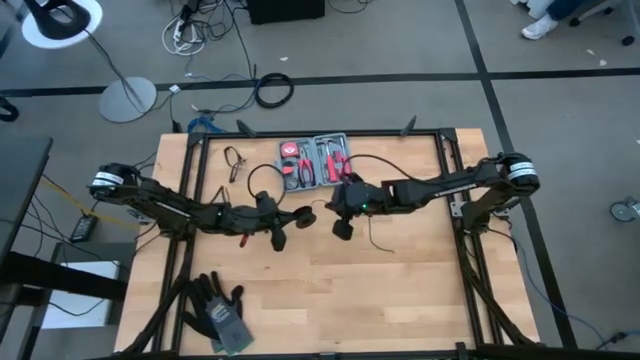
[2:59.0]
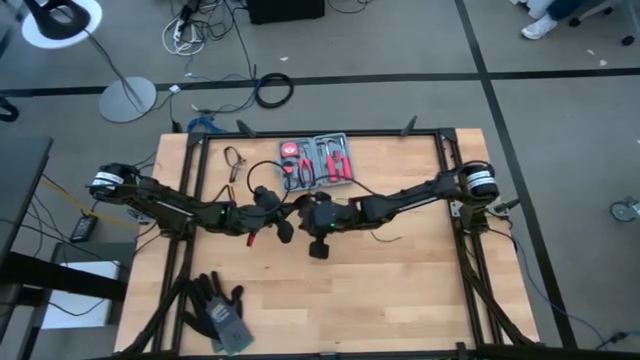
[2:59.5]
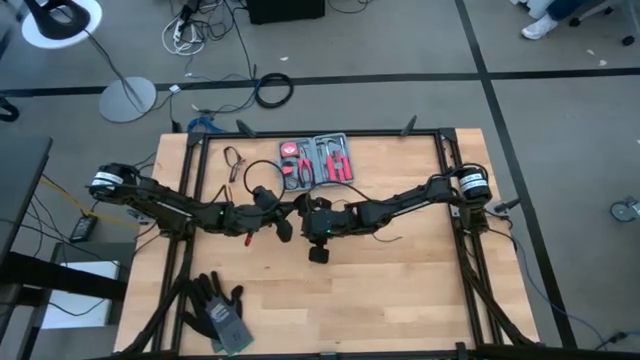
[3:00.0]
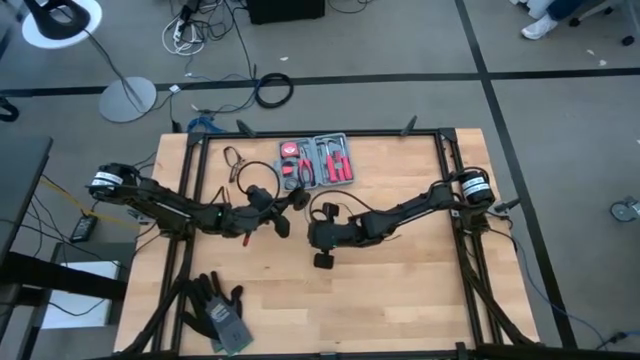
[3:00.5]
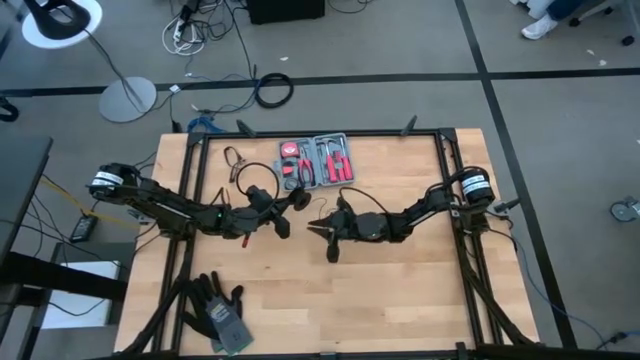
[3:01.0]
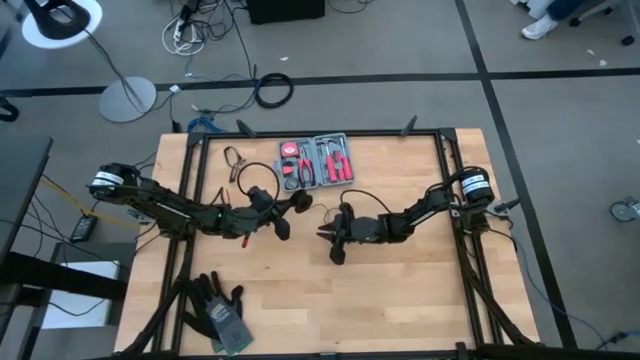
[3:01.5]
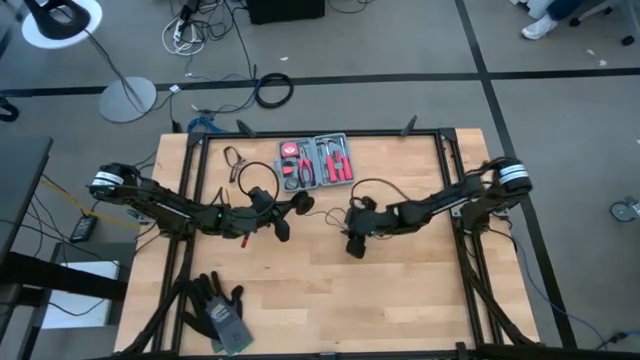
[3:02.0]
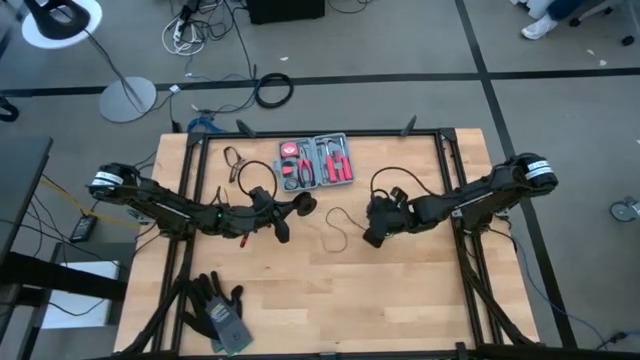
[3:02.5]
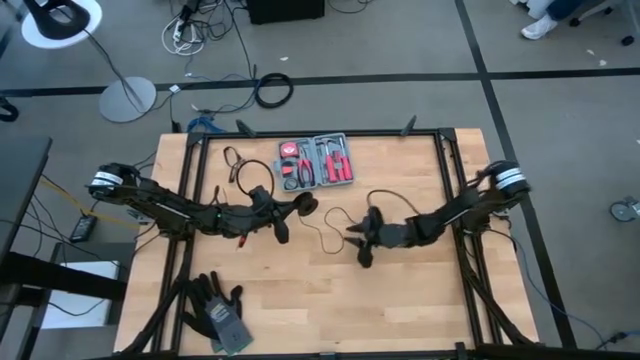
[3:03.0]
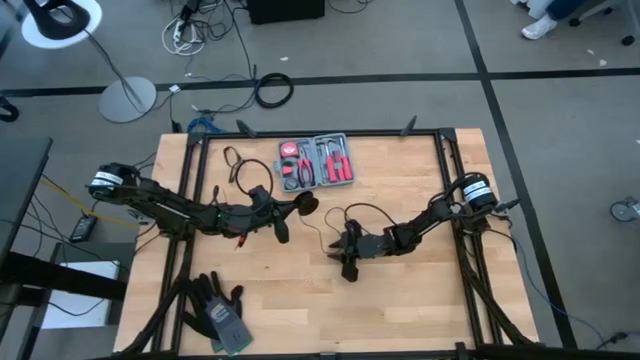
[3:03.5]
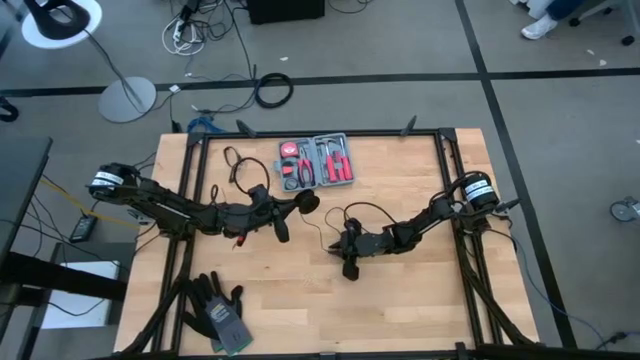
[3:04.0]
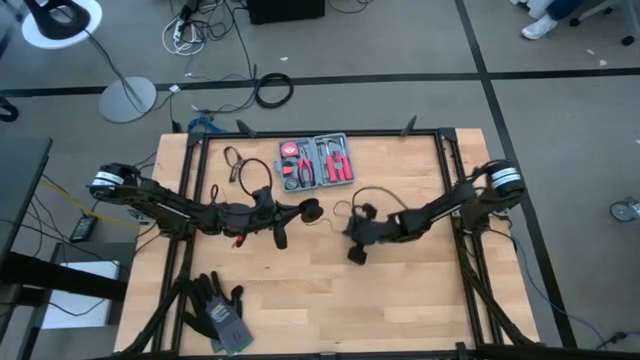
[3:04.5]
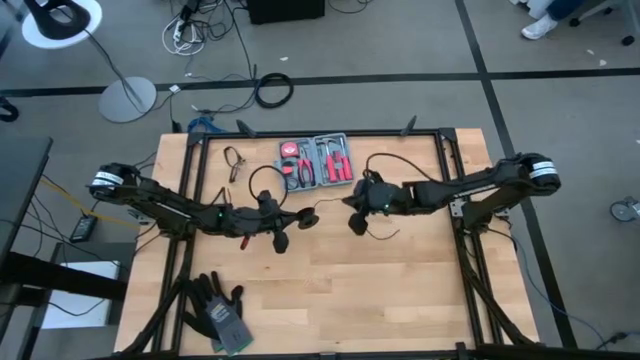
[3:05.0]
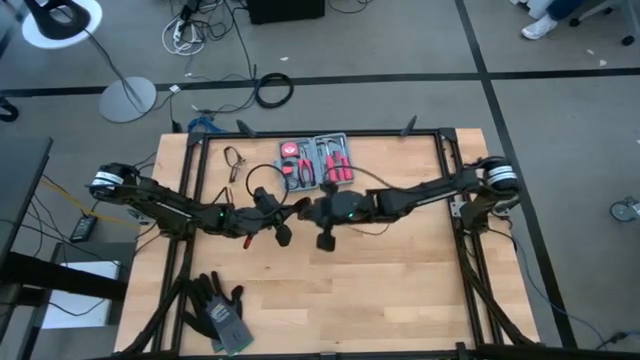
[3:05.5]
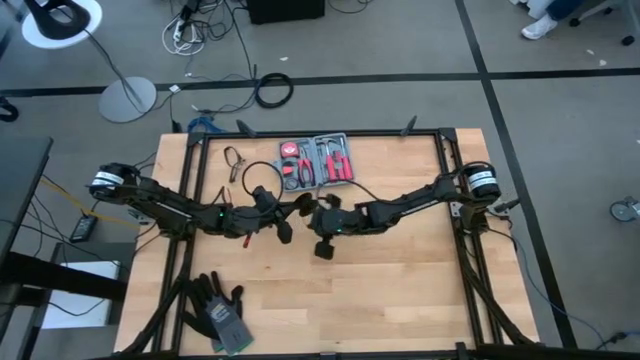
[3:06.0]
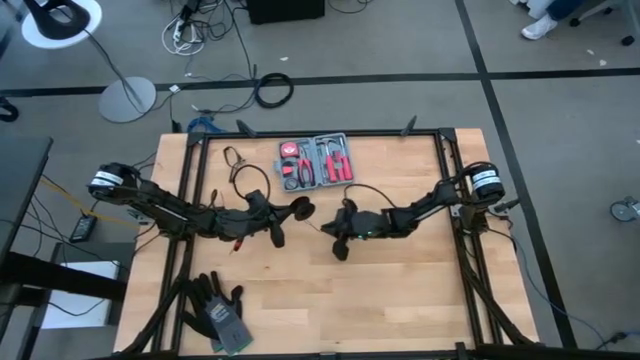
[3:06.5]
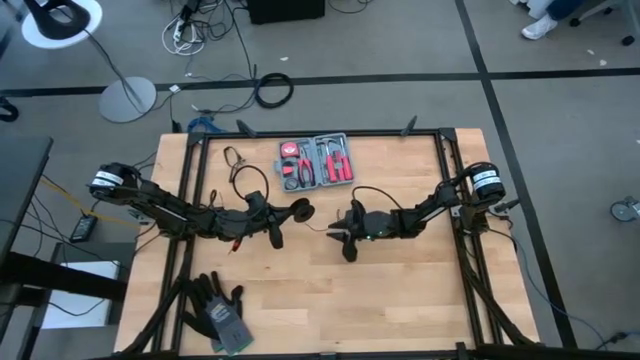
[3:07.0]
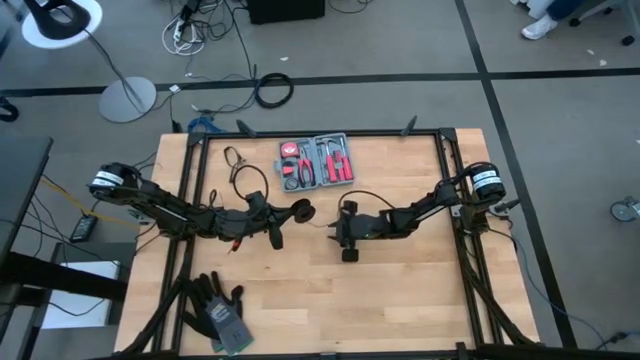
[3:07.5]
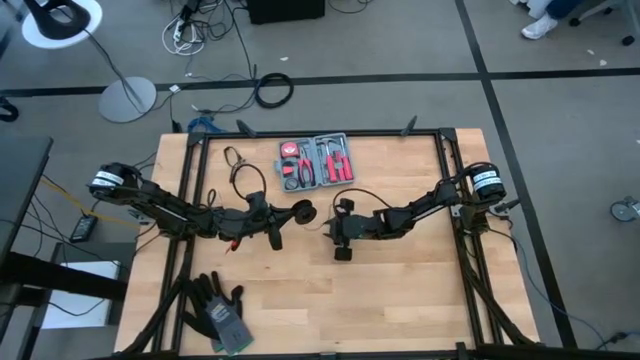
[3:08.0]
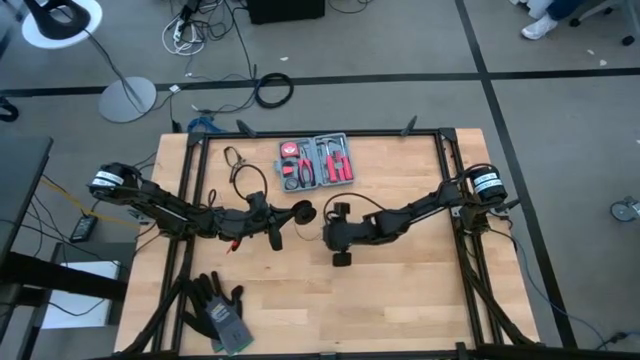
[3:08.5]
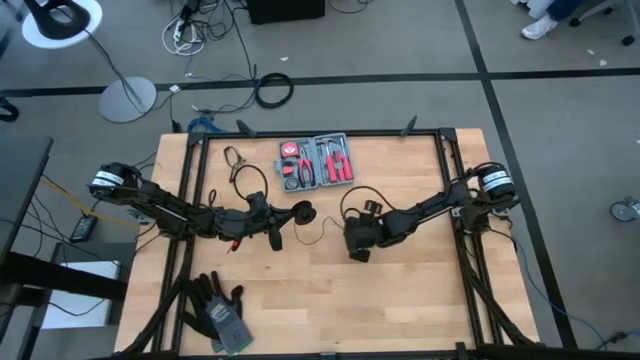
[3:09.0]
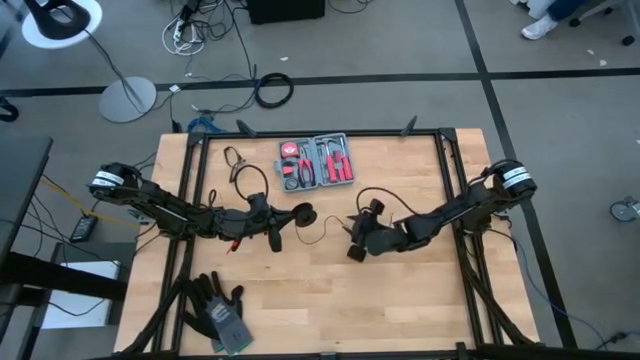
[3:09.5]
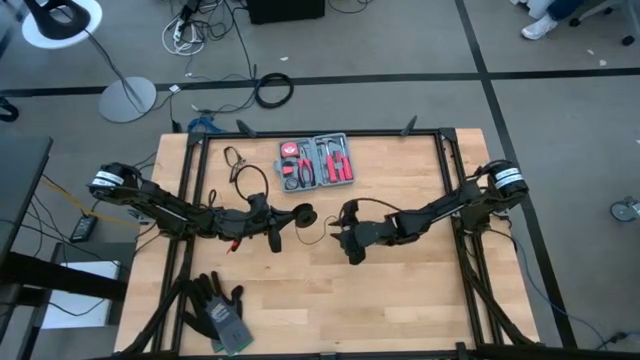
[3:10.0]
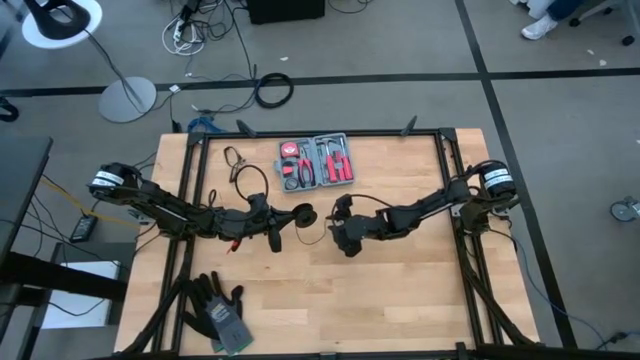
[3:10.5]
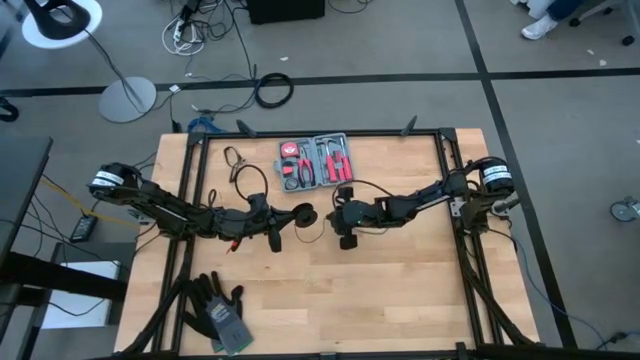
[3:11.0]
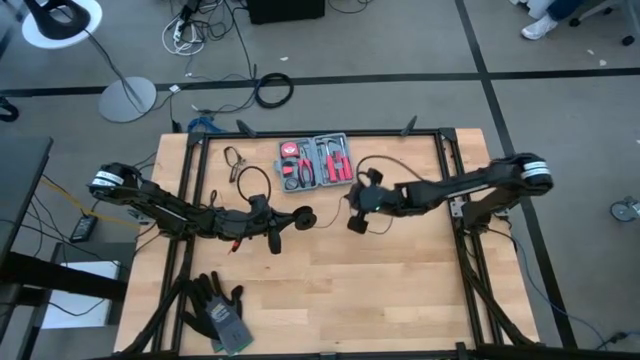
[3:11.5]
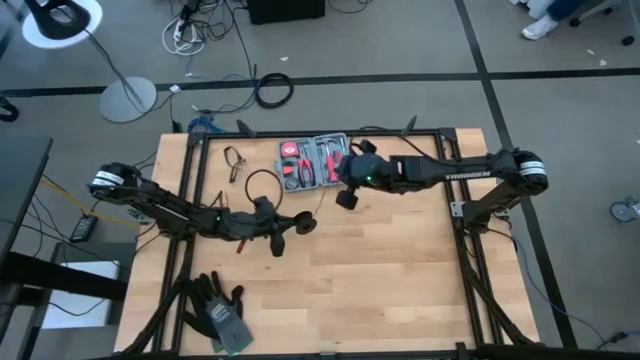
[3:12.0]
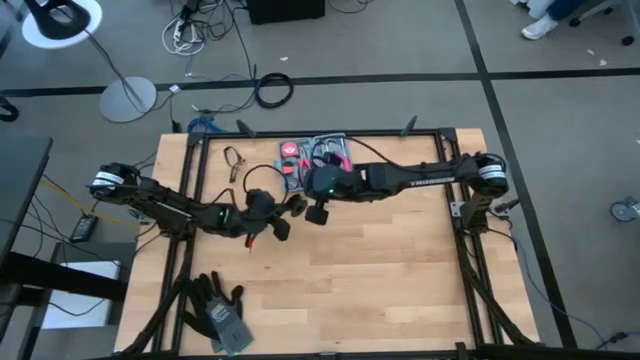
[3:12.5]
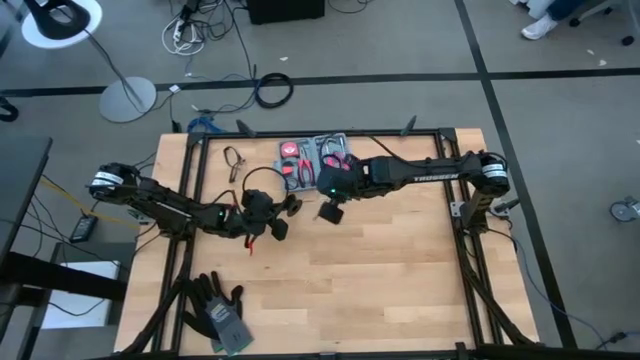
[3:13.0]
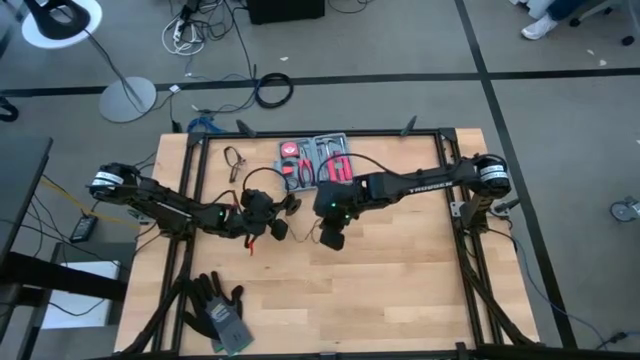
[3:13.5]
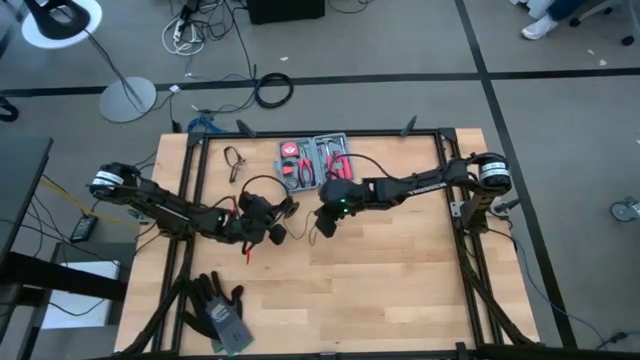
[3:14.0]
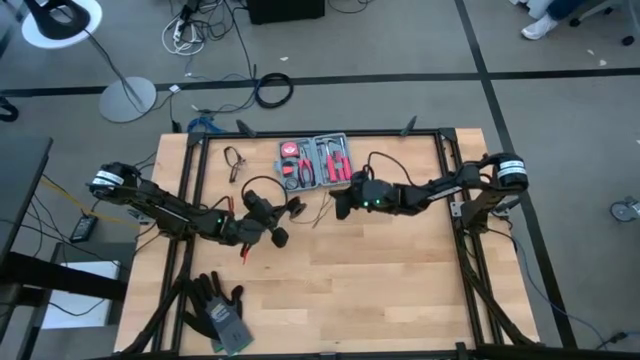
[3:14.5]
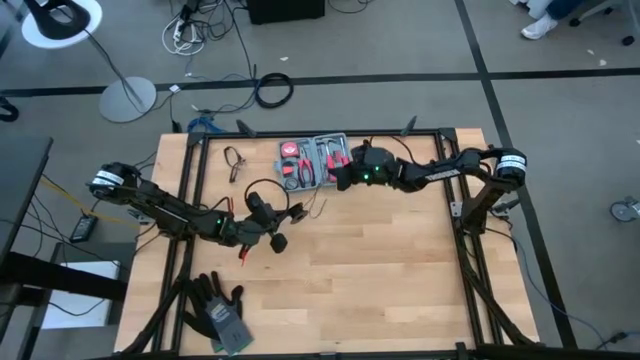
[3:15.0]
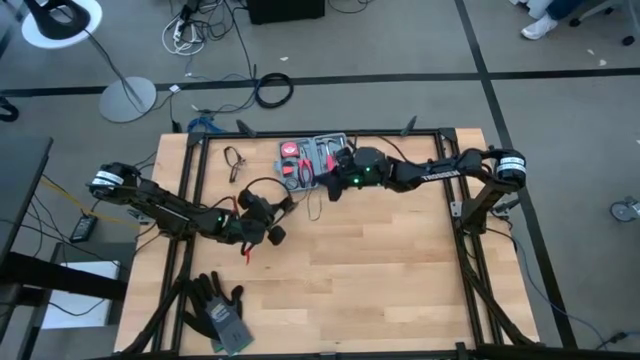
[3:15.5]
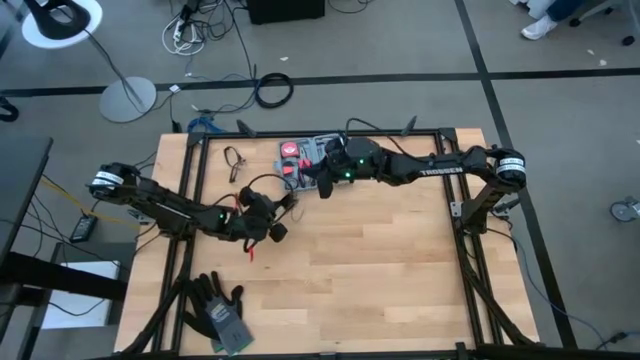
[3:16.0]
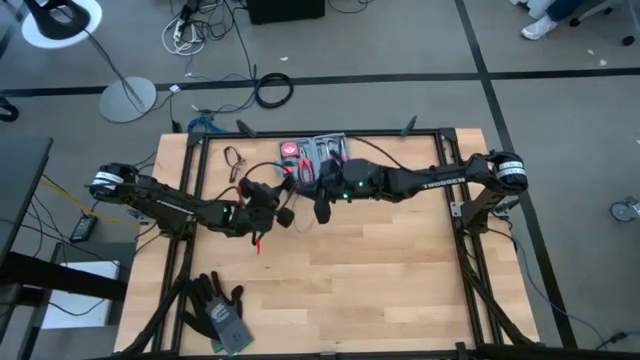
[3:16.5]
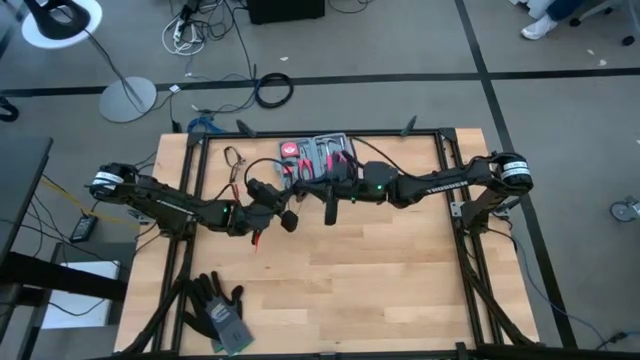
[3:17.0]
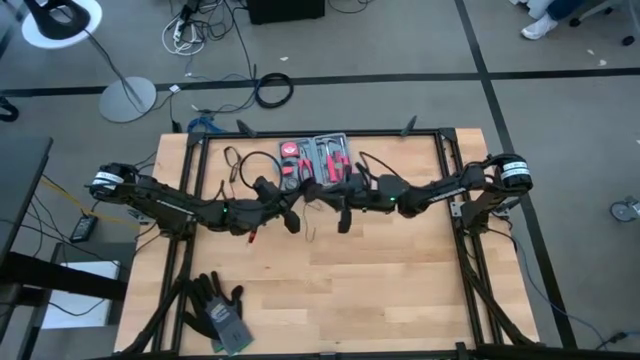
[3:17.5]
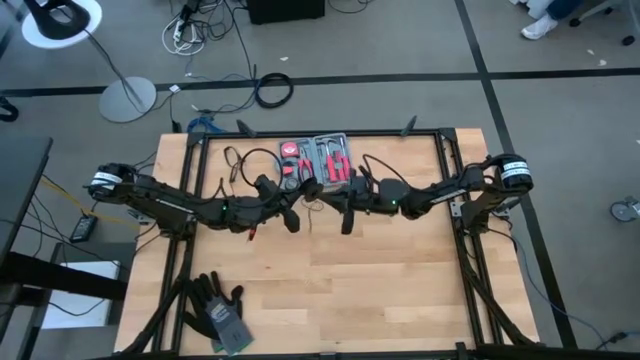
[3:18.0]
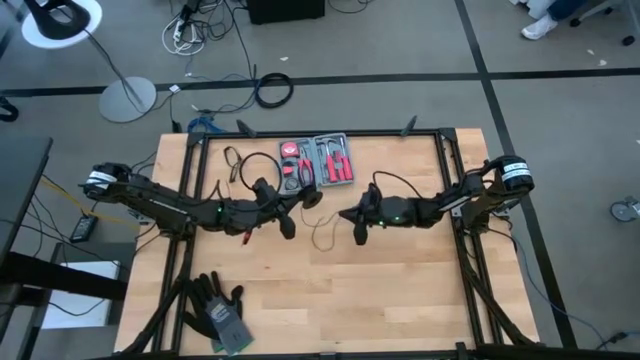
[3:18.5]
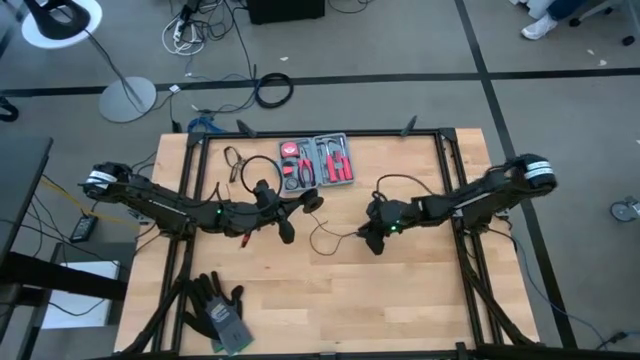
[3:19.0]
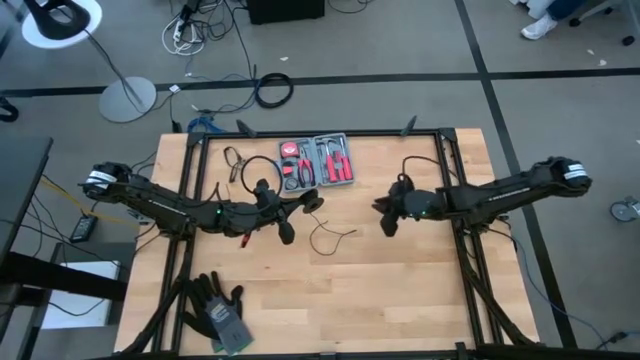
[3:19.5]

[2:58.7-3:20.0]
Task: Coil cords
Coil the black wire onto the black spool

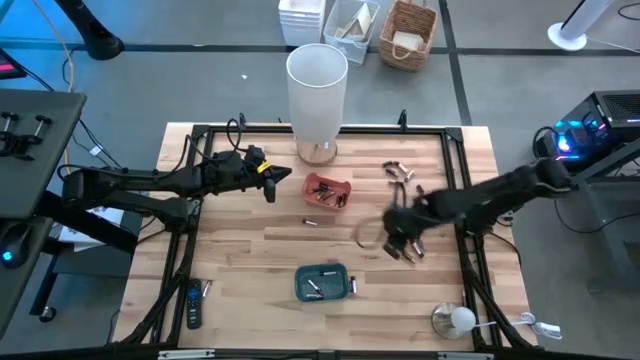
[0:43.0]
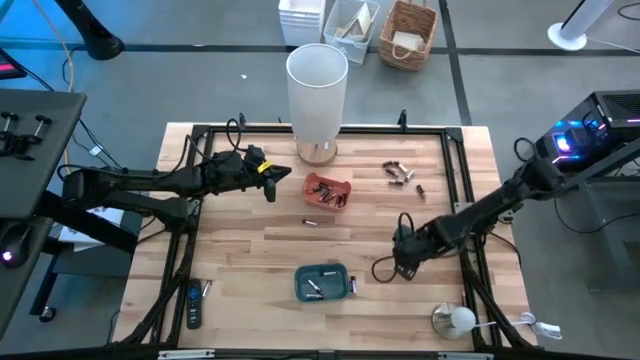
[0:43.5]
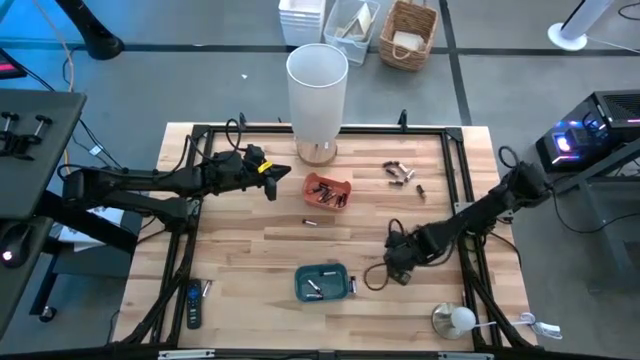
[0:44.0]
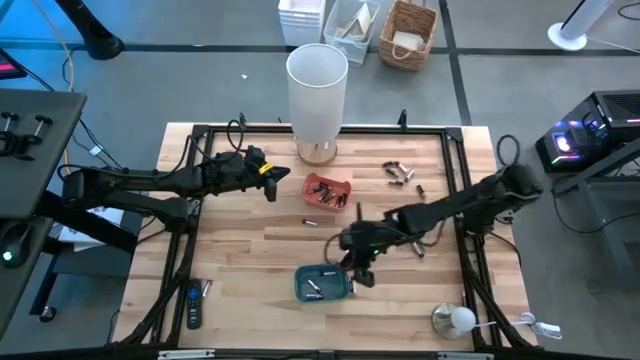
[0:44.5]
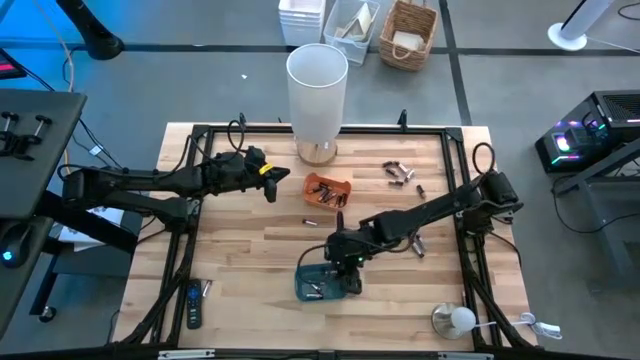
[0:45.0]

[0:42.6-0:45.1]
Task: Sort batteries
Put the black battery into the blue bin
